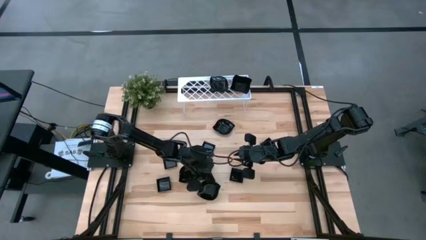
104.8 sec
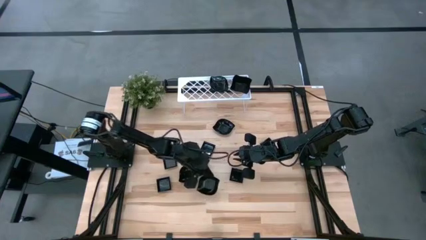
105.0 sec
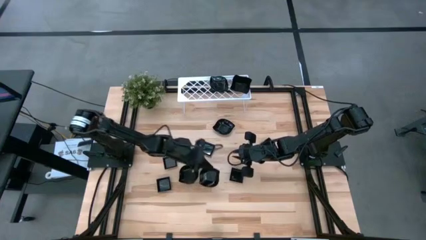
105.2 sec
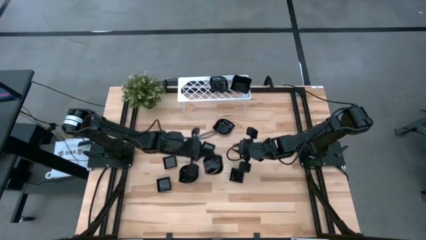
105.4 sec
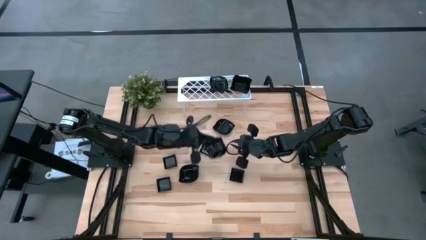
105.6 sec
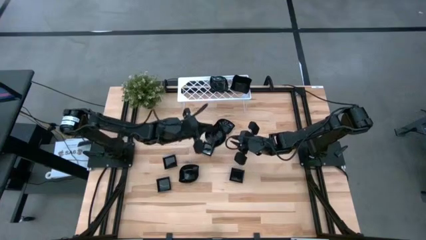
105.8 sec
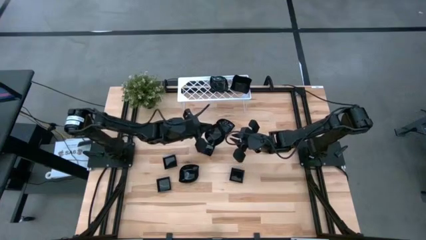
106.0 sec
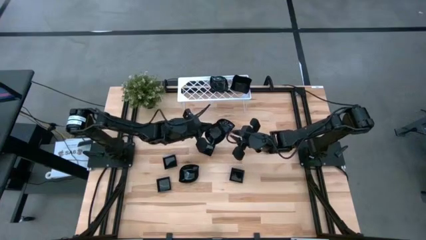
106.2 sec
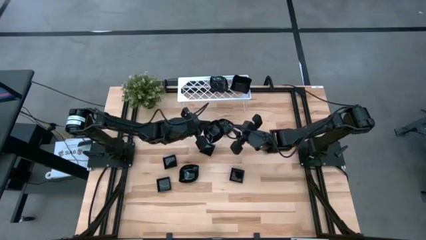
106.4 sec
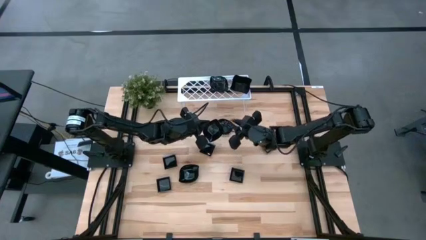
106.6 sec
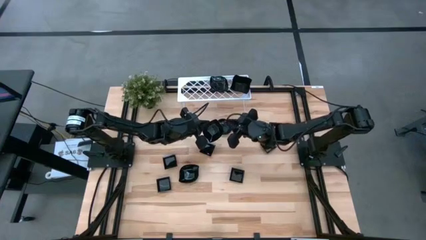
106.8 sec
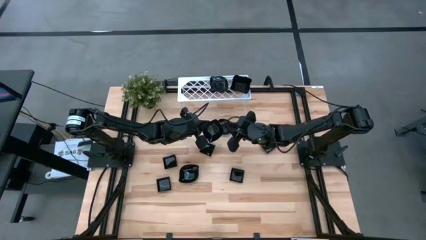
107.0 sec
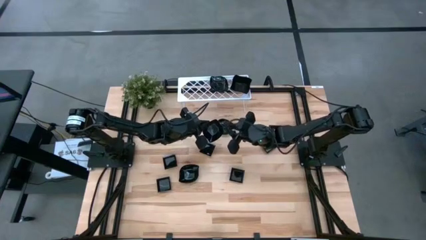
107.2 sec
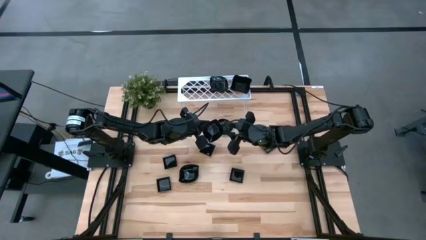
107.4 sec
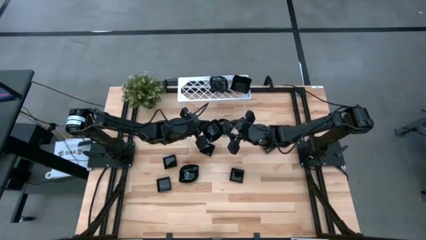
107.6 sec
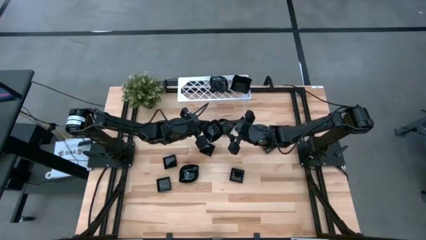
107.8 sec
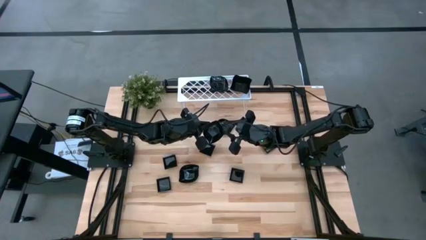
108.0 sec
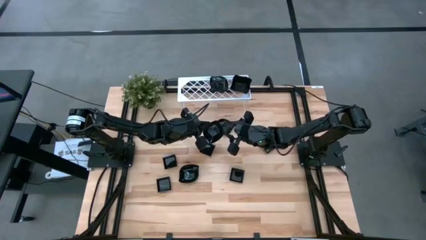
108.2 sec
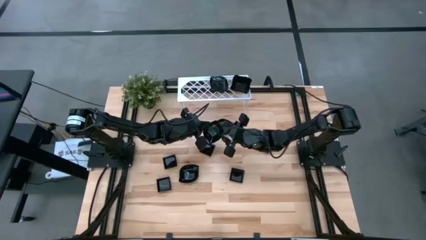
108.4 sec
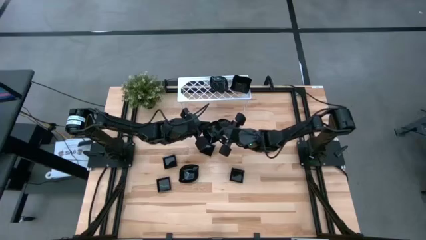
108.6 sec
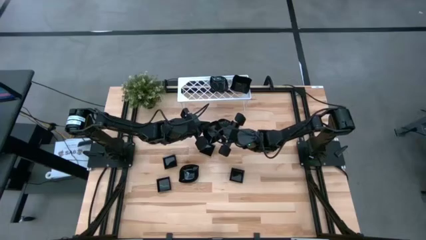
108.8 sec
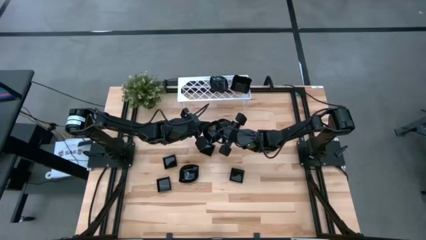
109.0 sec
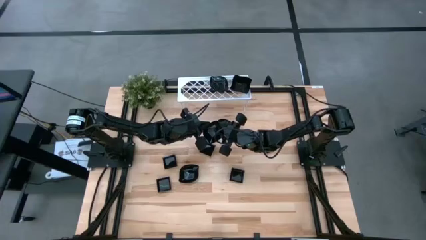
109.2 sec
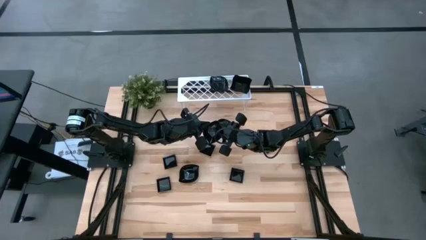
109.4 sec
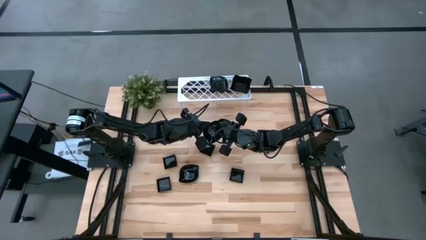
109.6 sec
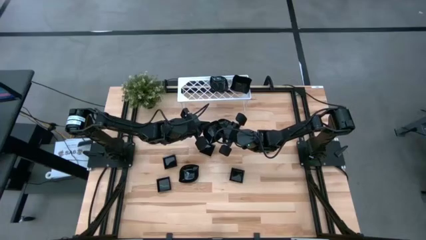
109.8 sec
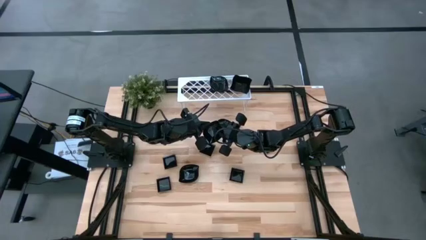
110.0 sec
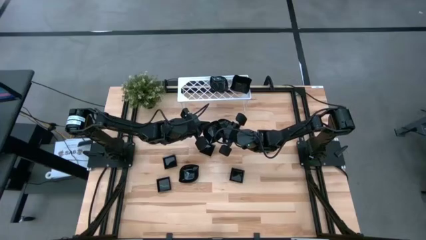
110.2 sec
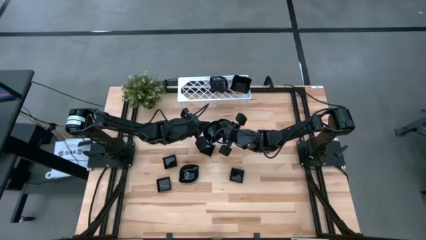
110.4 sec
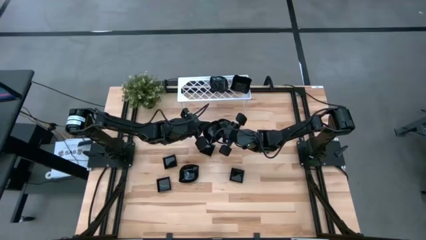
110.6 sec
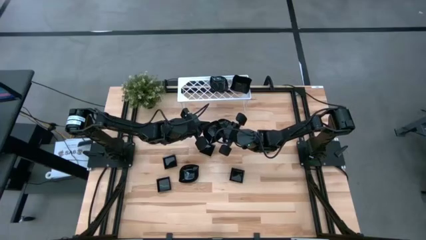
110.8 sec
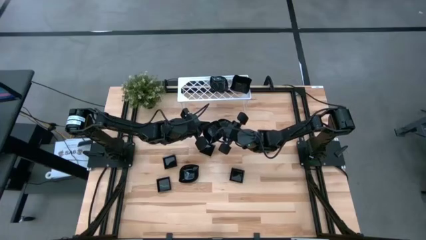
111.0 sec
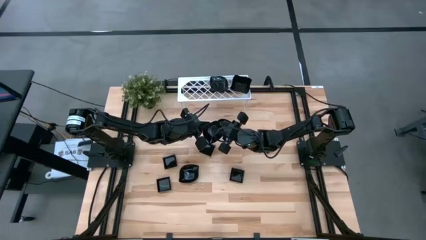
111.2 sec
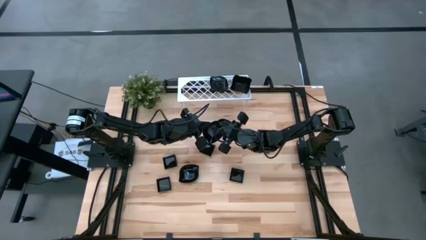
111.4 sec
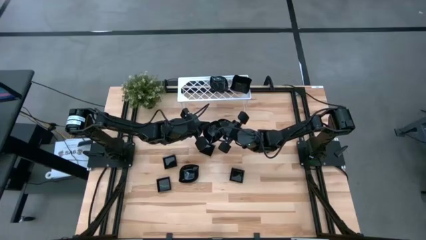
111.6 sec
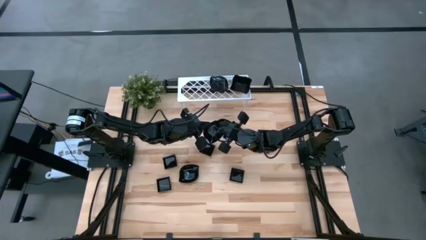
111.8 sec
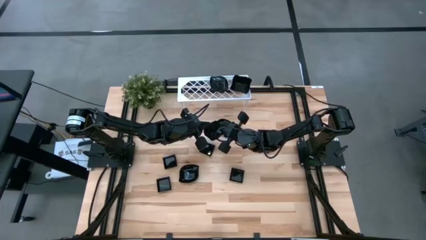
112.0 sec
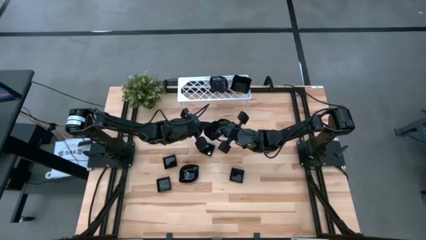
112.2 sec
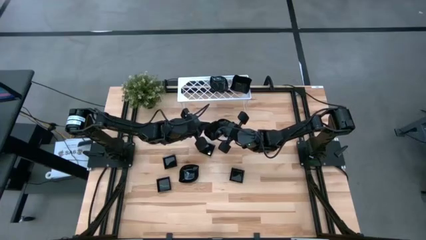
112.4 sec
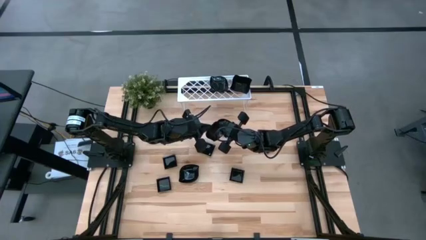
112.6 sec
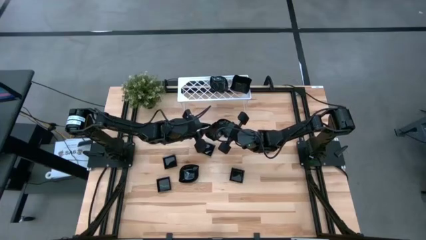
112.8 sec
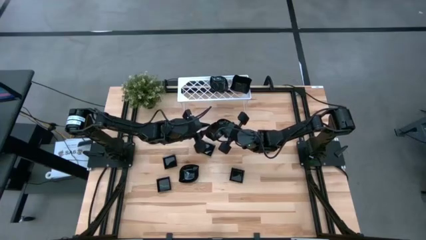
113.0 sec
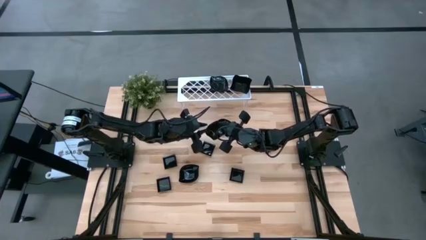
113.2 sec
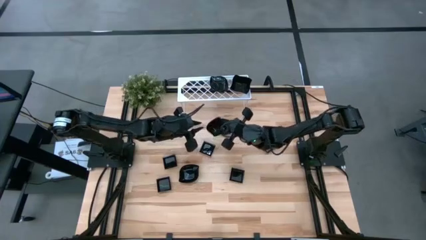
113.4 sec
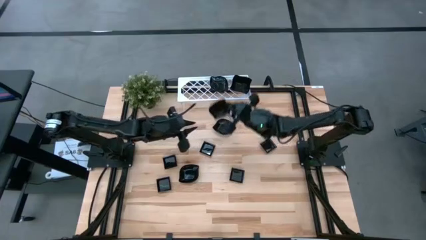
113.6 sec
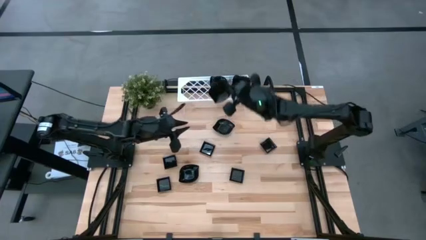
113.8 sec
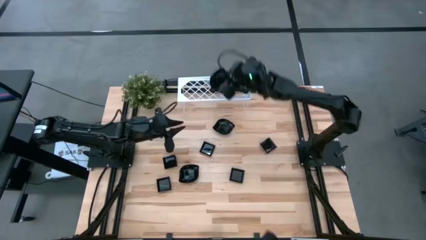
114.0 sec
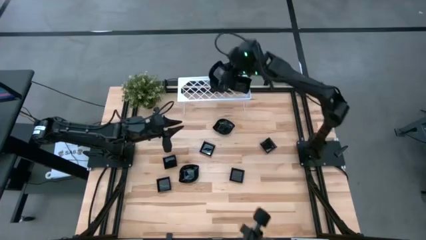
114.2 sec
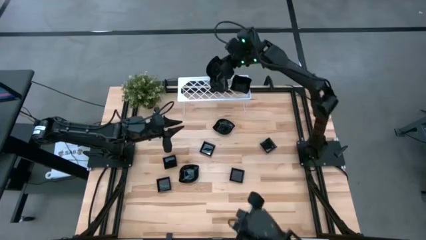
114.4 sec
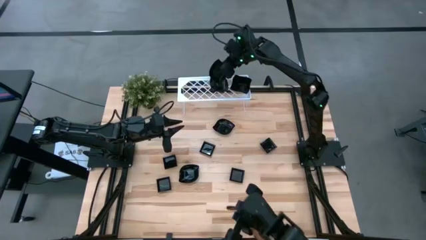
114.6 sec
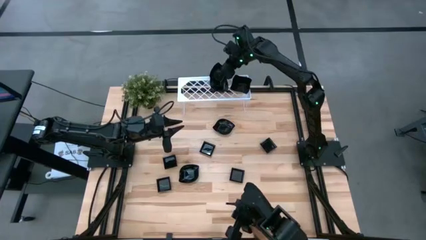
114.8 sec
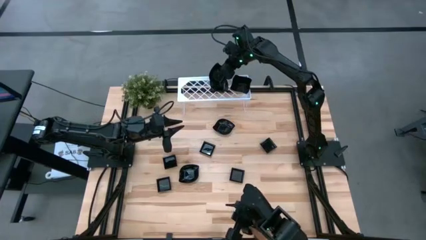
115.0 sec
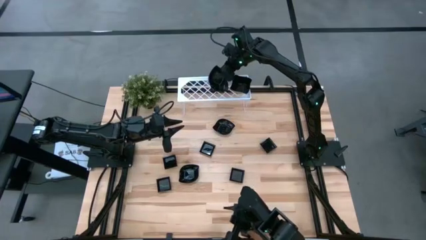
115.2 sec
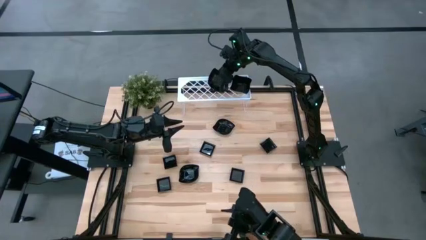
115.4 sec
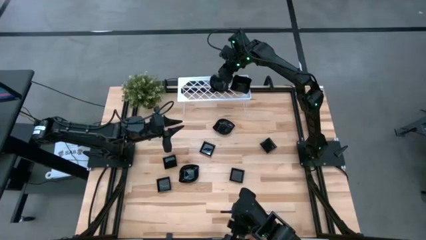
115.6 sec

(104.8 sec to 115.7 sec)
Task: Pick & Place Mini shaped plates
Stack the black leaf-shaped plate on top of the black leaf-shaped plate on the shelf

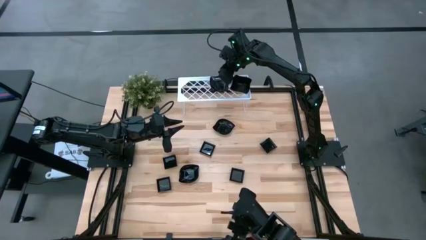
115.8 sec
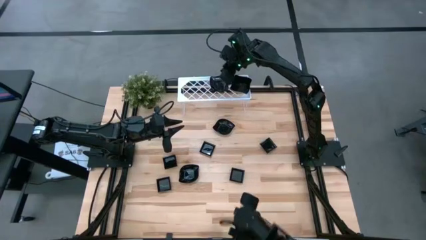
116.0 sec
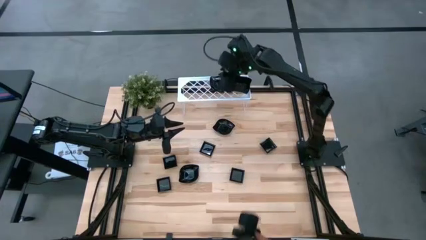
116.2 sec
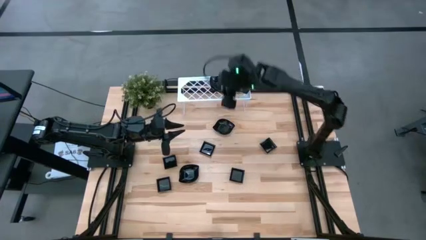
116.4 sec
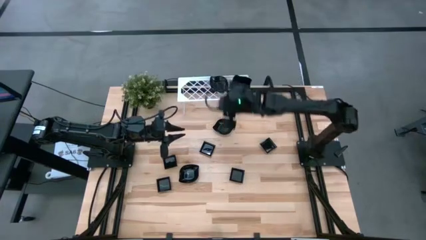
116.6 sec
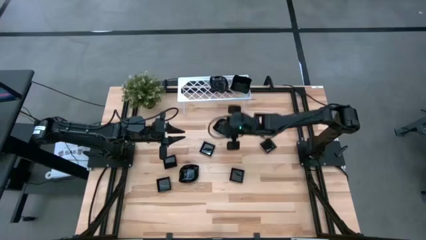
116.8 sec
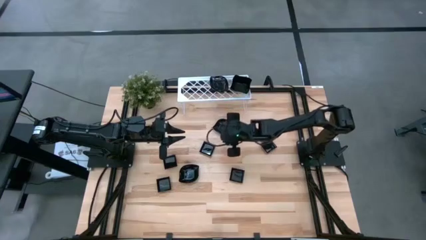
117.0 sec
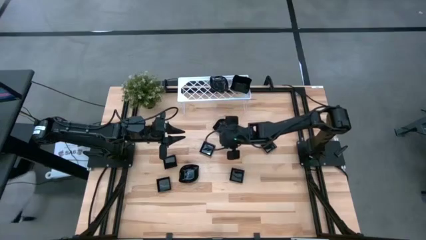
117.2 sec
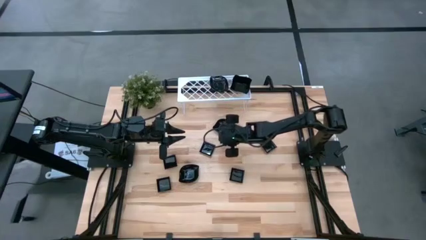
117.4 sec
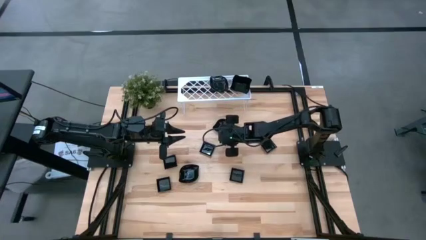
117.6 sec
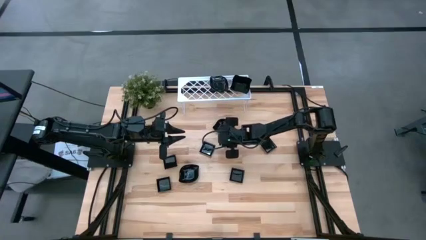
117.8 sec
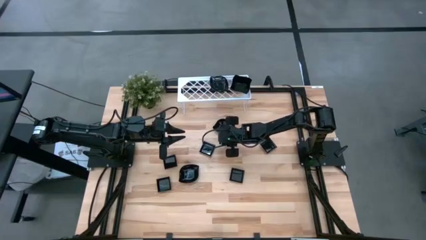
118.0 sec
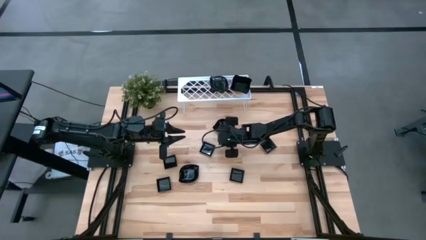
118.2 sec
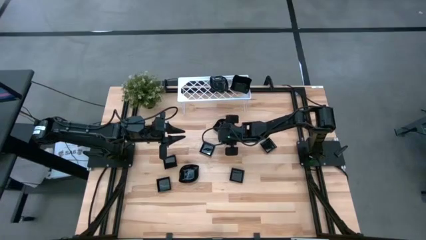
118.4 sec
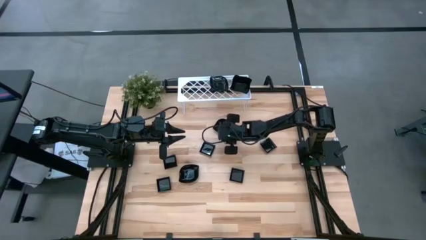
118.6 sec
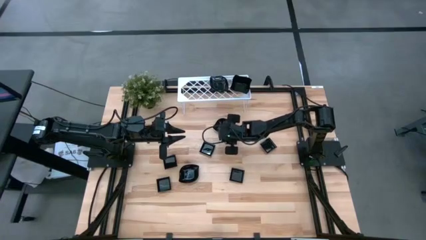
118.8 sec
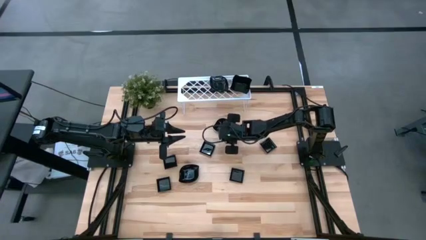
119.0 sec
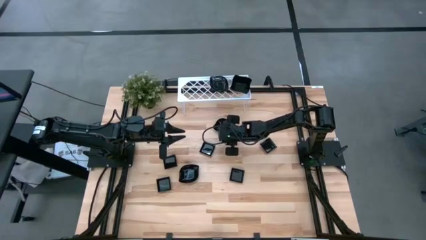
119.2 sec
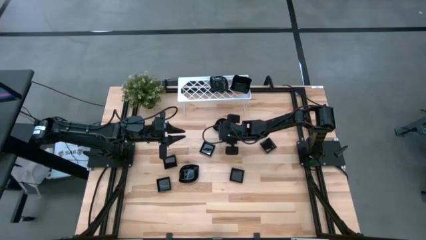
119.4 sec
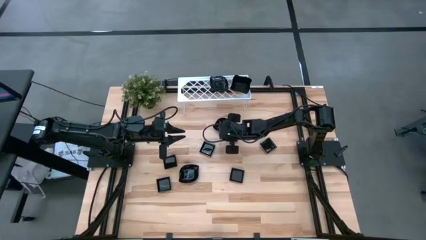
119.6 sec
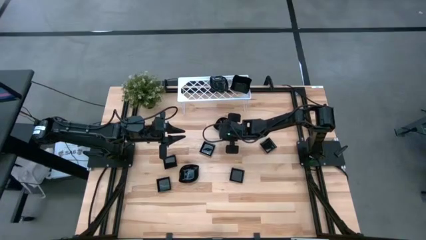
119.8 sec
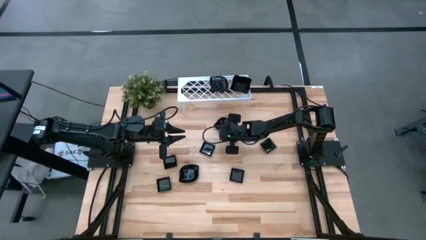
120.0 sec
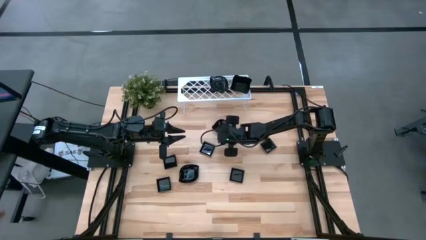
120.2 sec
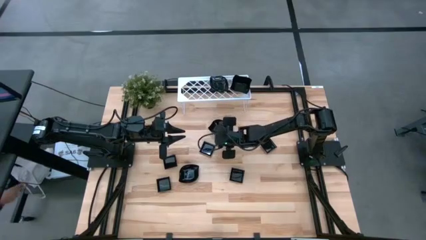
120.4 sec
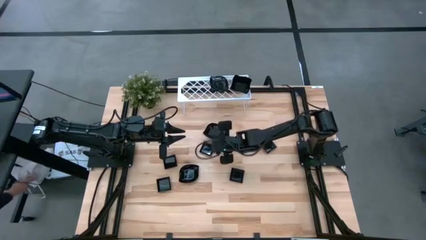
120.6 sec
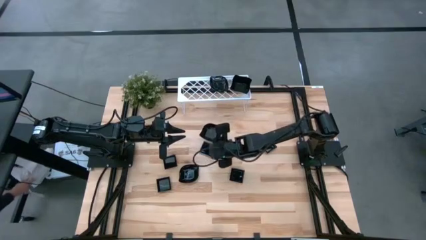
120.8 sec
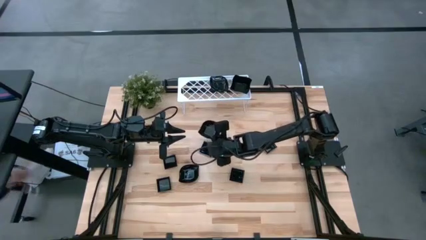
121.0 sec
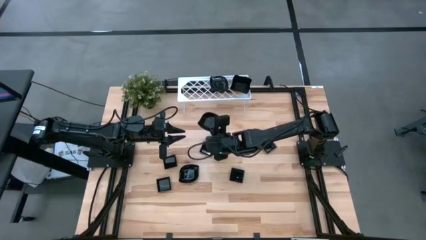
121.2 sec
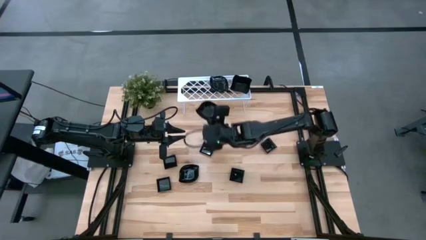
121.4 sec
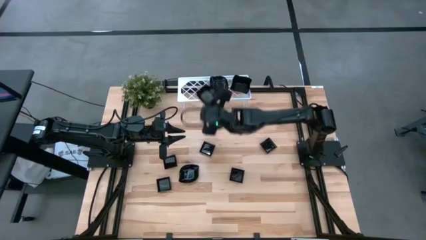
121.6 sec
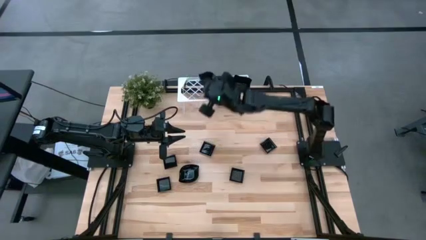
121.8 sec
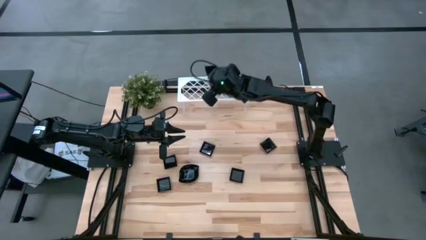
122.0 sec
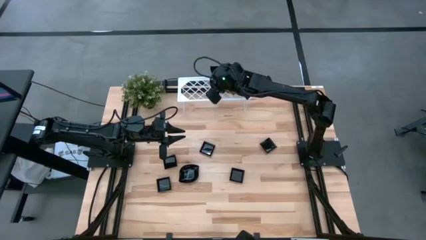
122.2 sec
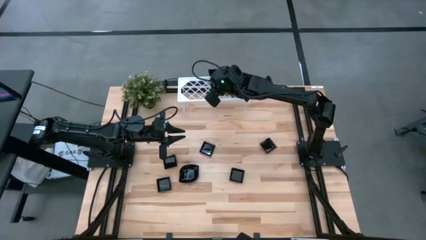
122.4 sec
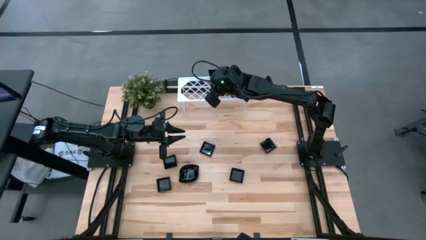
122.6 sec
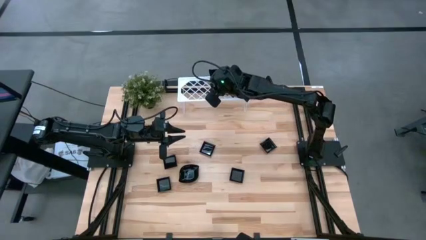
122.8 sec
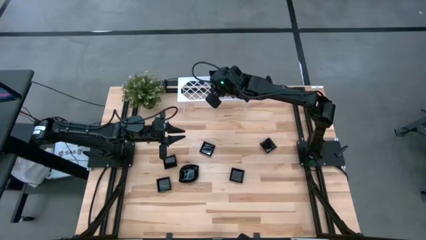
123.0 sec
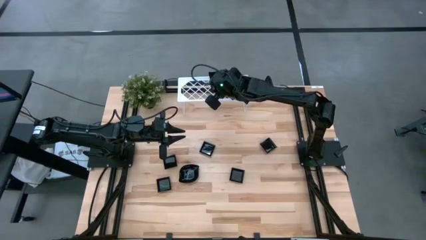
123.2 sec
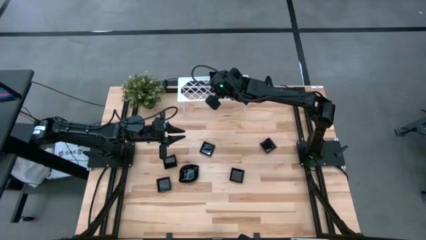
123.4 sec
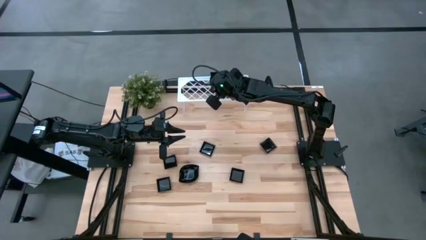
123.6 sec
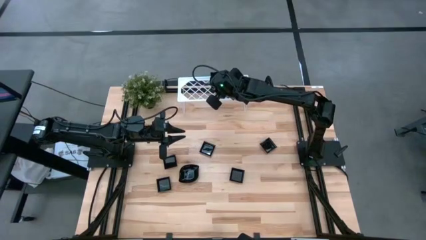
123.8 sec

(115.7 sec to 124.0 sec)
Stack the black leaf-shaped plate on top of the black leaf-shaped plate on the shelf
